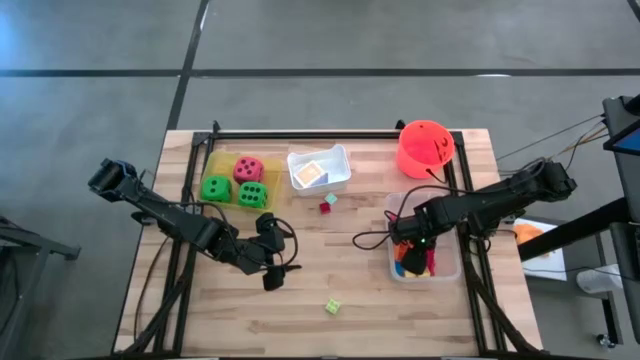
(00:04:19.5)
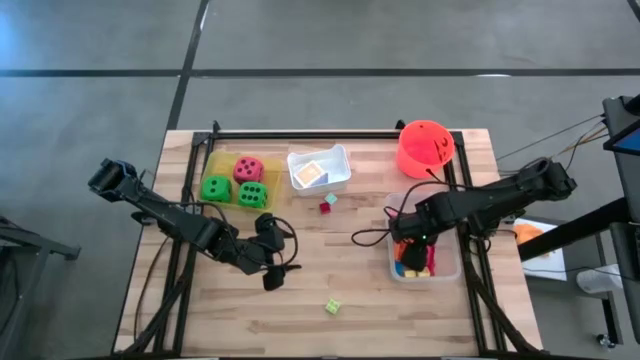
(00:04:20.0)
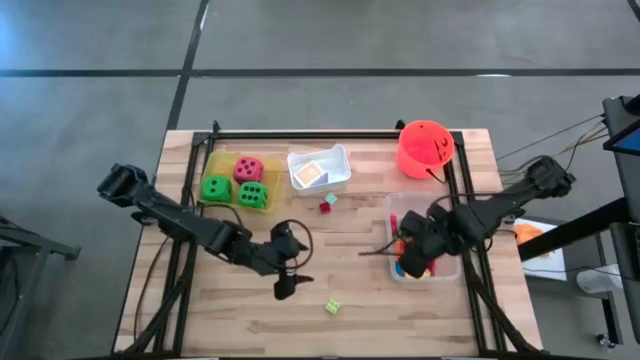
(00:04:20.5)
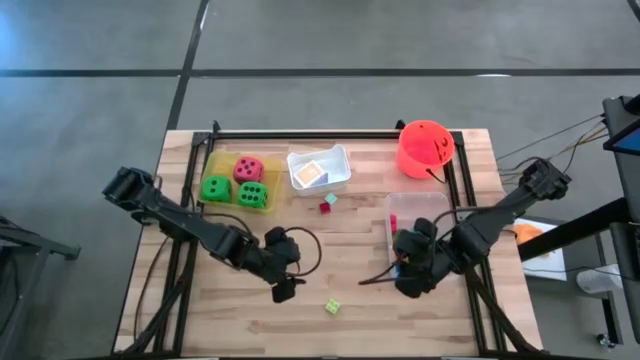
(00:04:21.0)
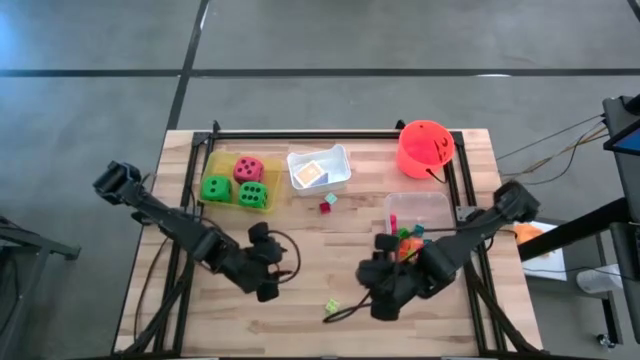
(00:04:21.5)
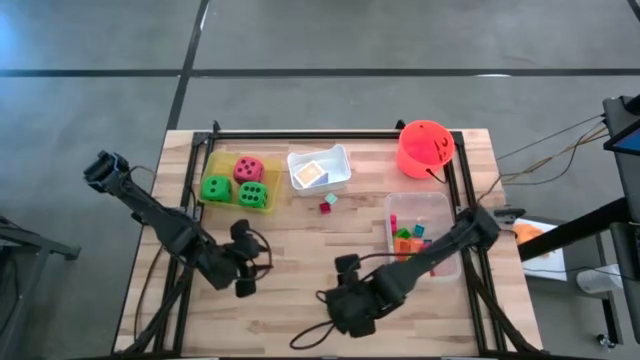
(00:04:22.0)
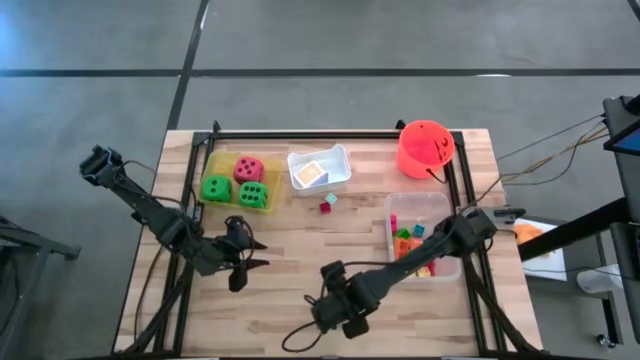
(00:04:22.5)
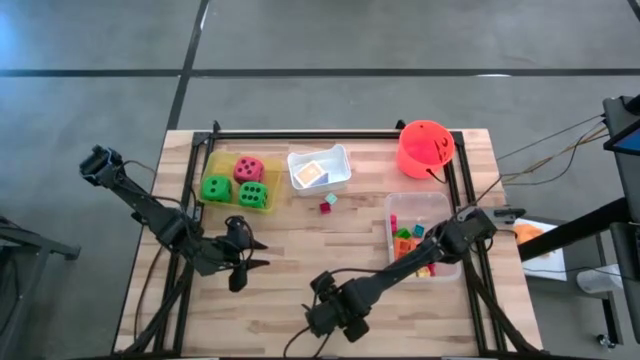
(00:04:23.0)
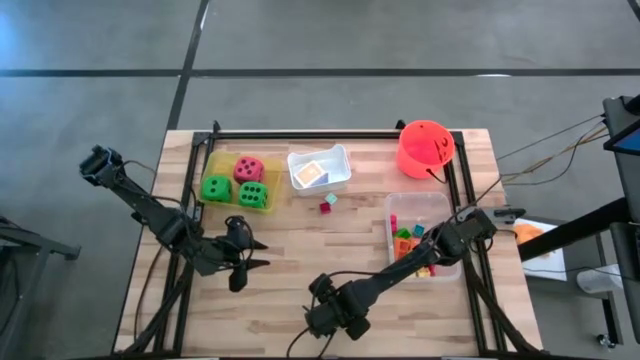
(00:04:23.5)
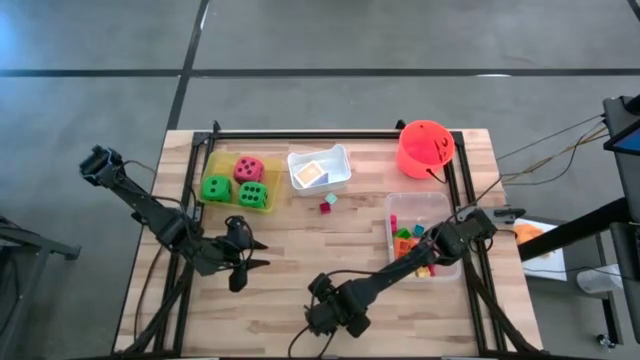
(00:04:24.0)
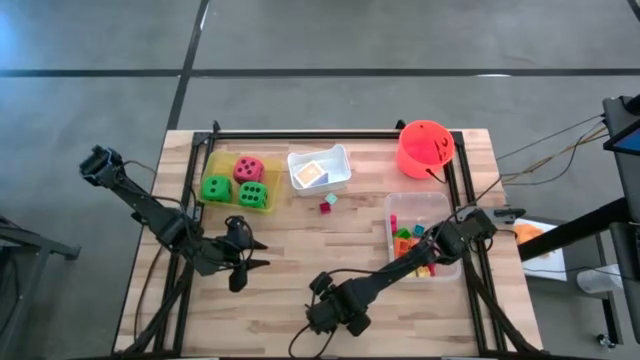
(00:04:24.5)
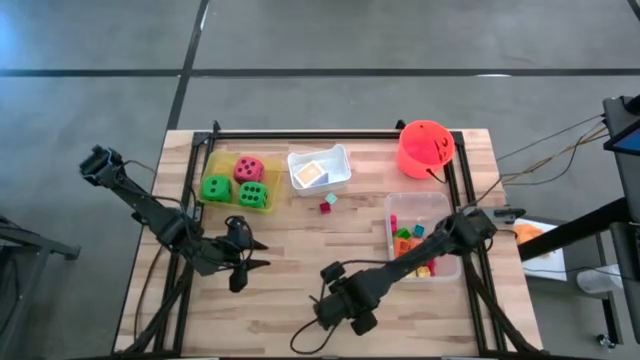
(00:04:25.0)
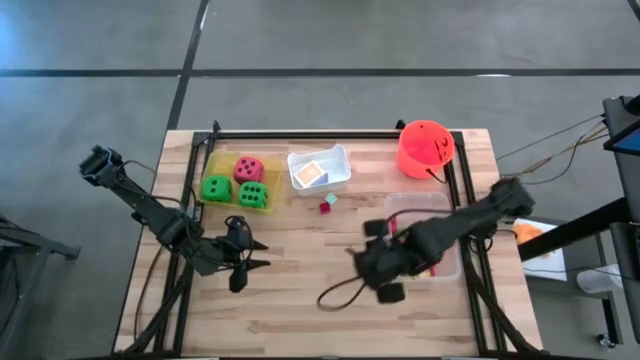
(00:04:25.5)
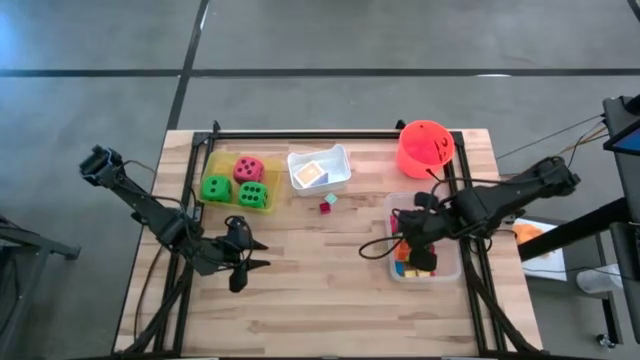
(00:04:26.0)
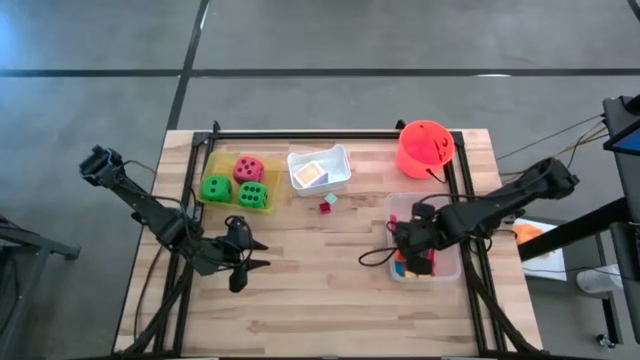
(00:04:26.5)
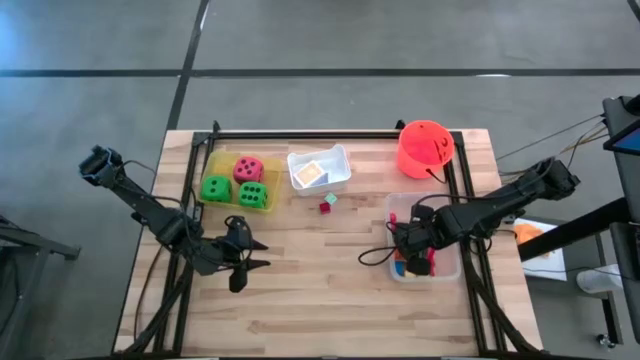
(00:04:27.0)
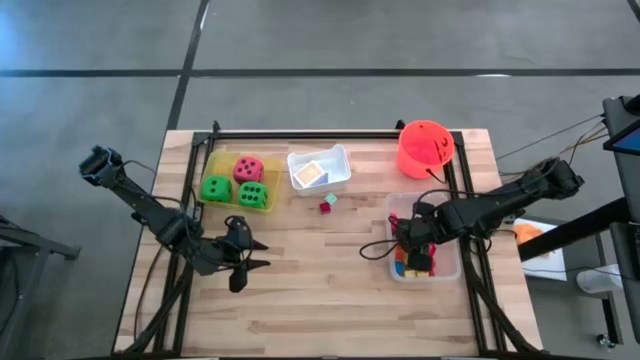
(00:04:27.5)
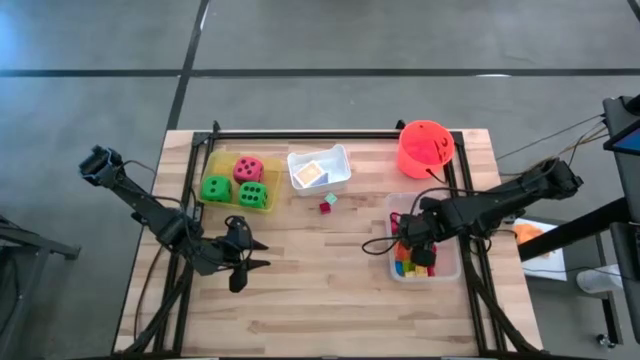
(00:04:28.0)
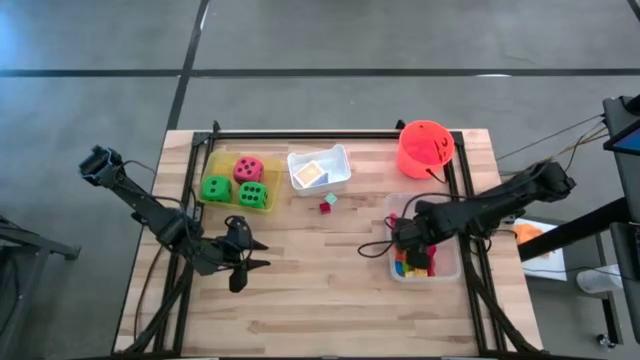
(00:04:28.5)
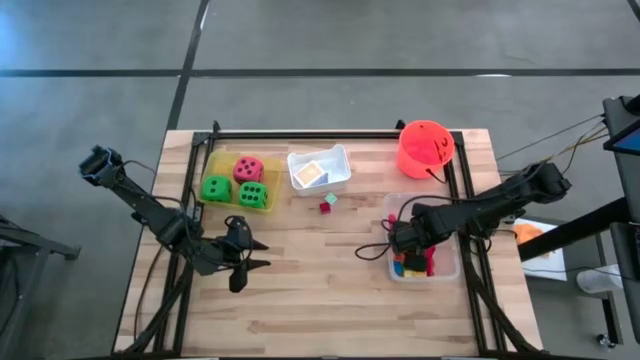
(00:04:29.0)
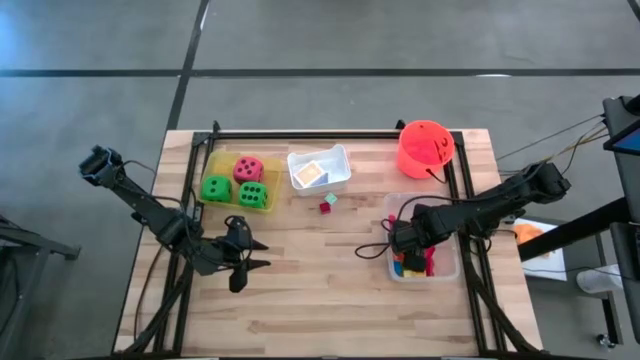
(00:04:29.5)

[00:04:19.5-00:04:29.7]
Task: Pick & Place Toys
Put the light green game piece into the transparent bin

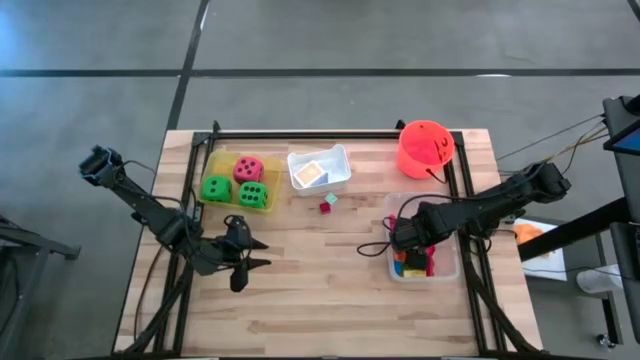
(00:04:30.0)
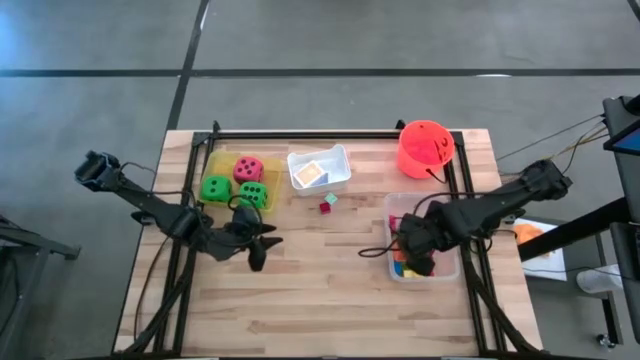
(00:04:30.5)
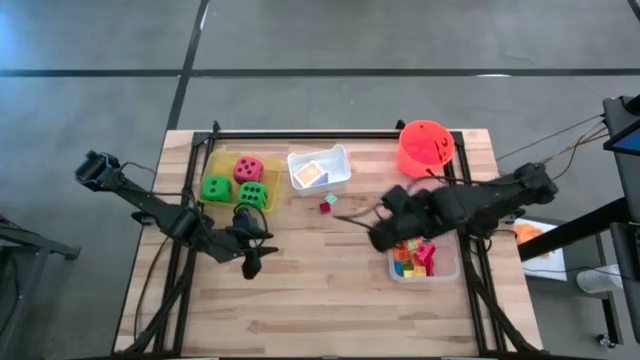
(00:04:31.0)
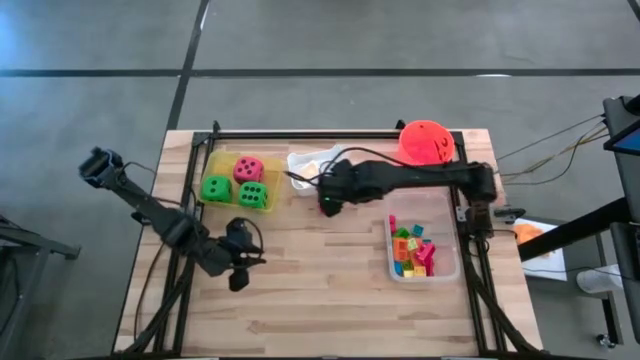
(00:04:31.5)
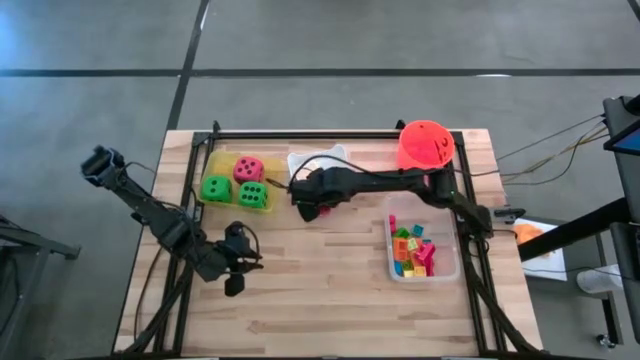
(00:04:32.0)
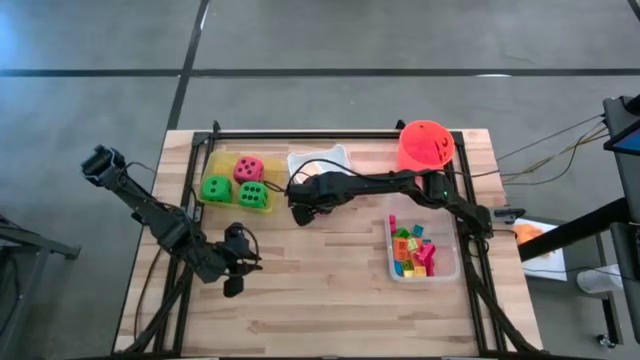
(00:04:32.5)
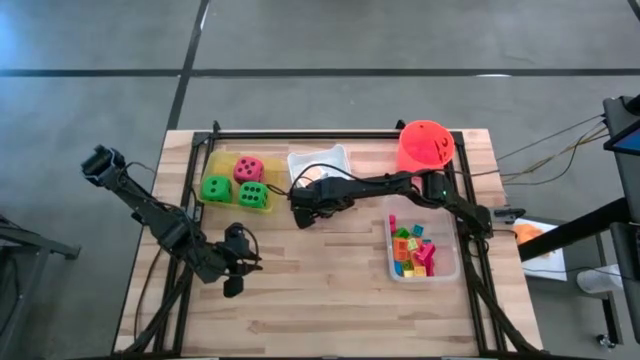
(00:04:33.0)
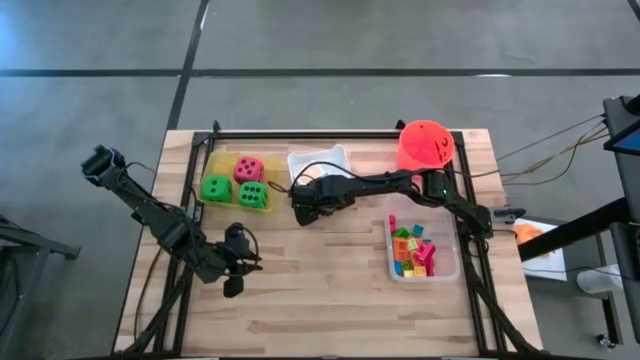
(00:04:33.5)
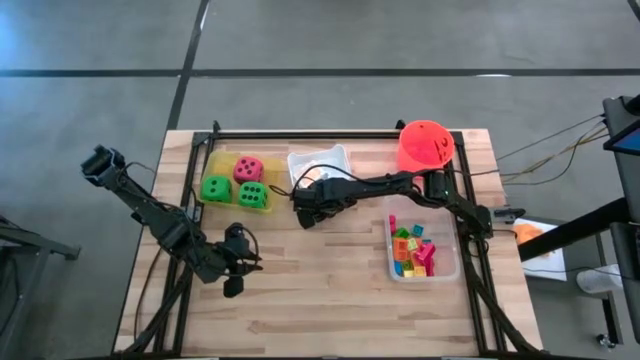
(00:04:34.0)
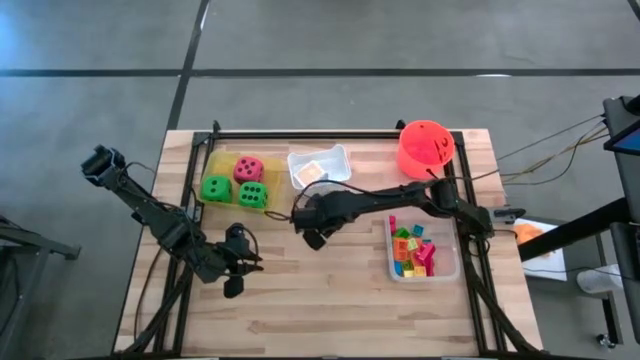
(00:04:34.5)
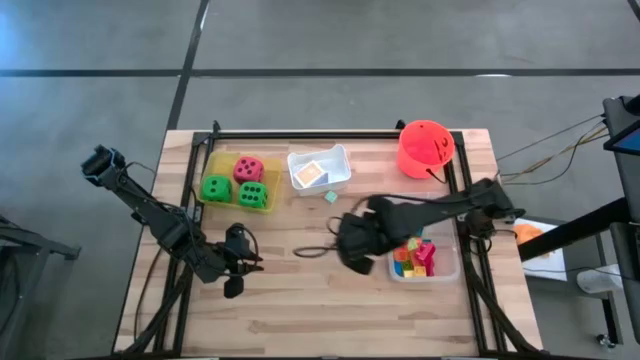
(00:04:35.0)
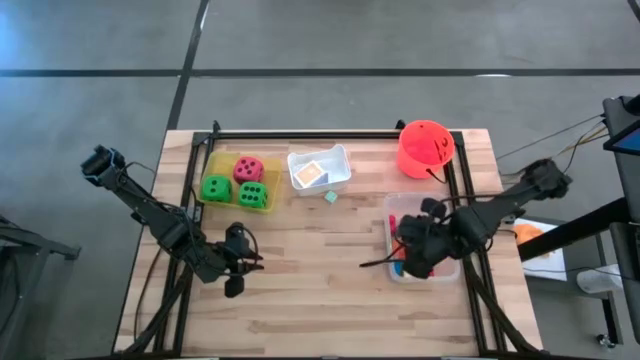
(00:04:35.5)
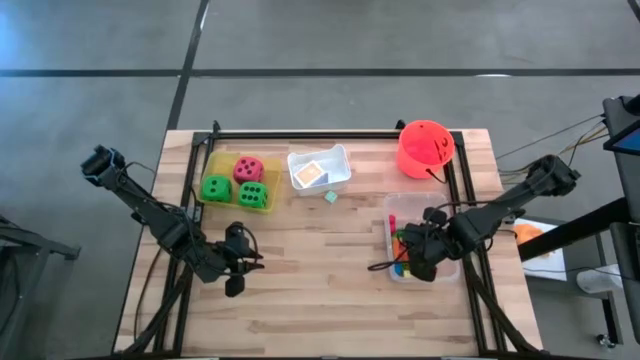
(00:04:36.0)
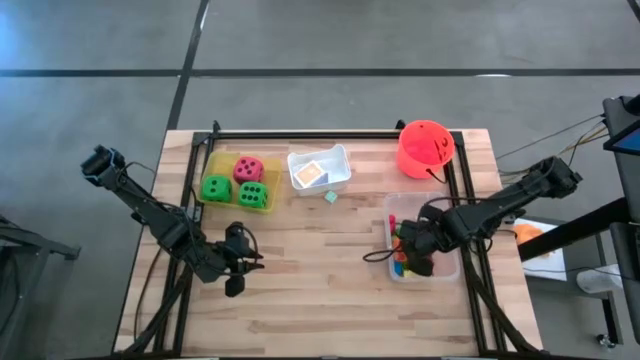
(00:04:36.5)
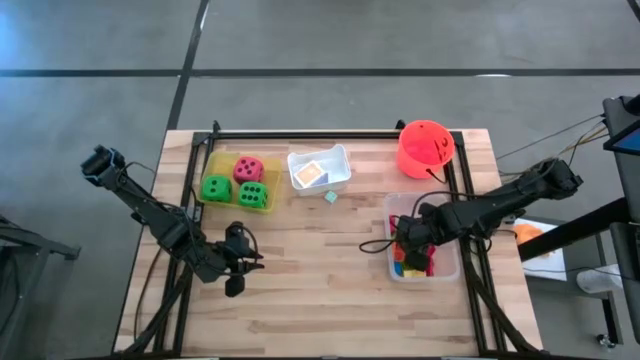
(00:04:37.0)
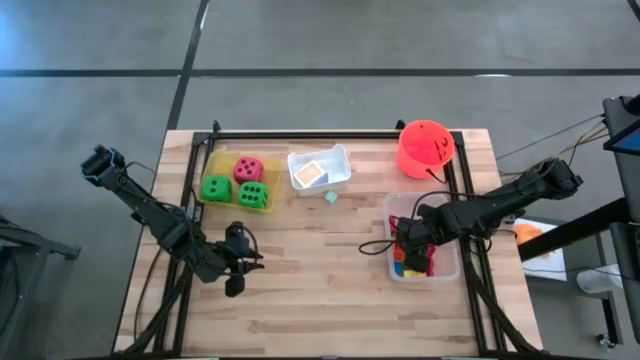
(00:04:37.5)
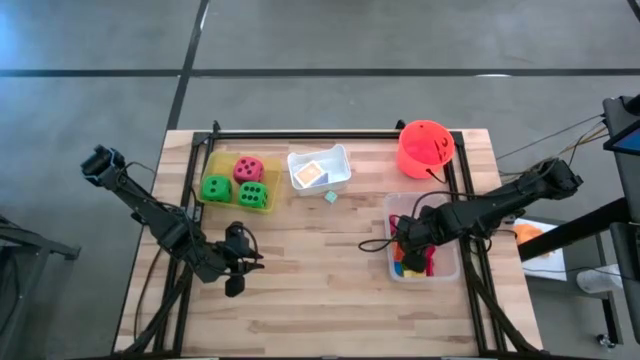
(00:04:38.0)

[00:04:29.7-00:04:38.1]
Put the red game piece into the transparent bin
